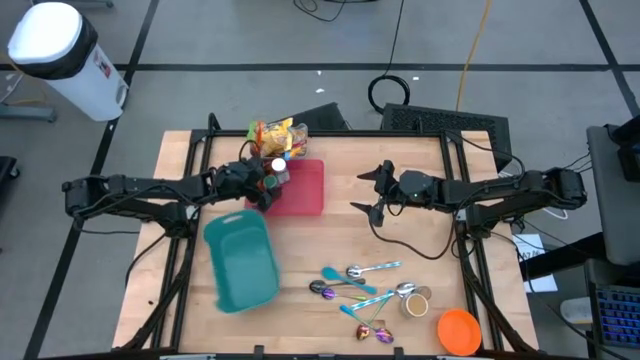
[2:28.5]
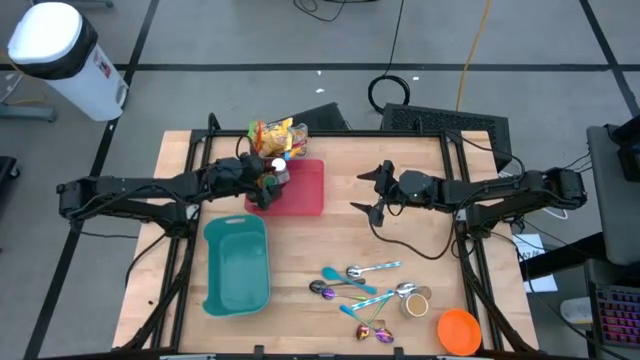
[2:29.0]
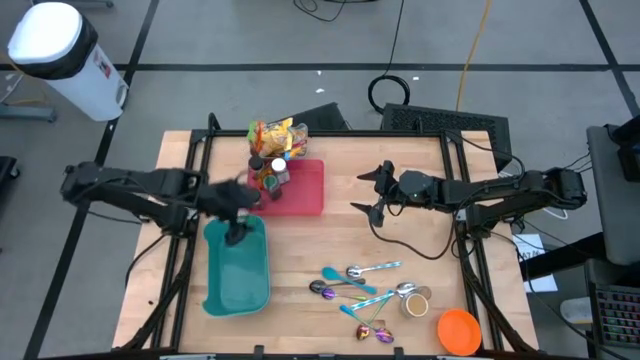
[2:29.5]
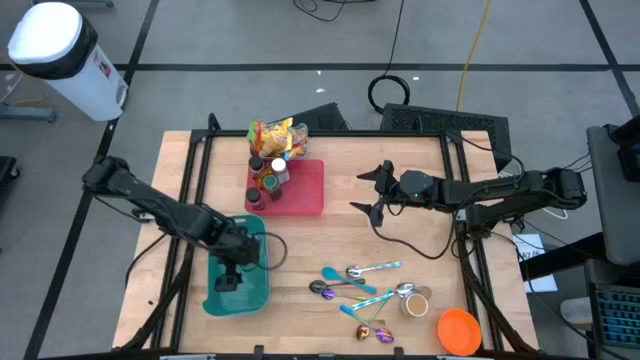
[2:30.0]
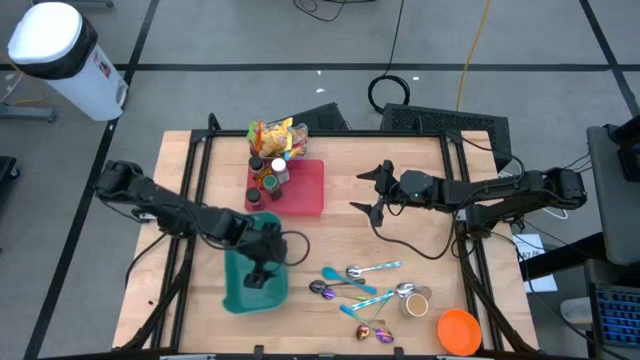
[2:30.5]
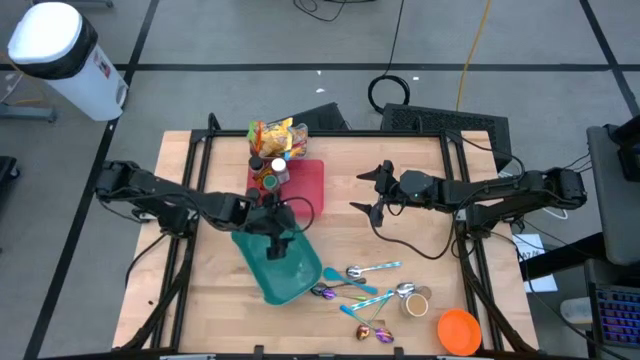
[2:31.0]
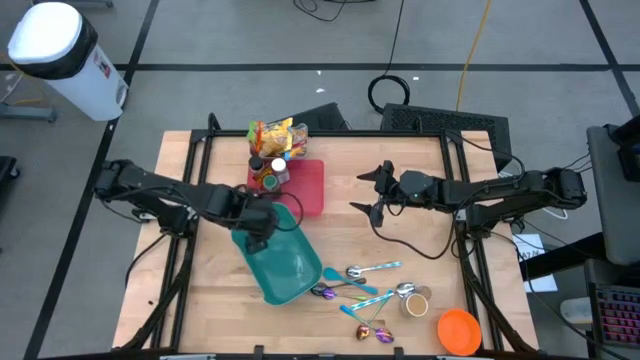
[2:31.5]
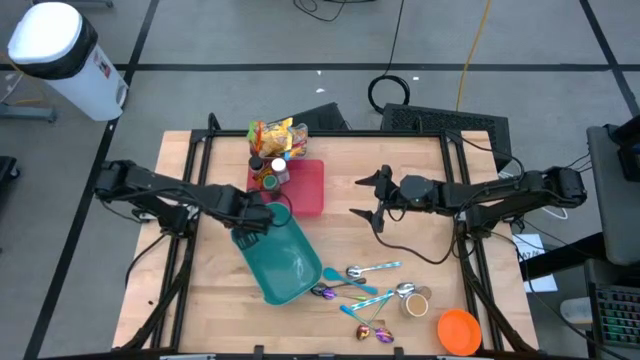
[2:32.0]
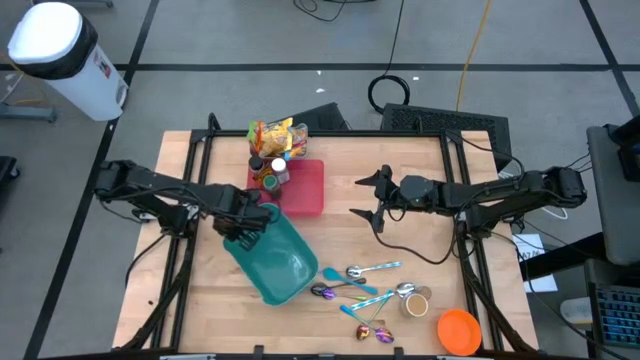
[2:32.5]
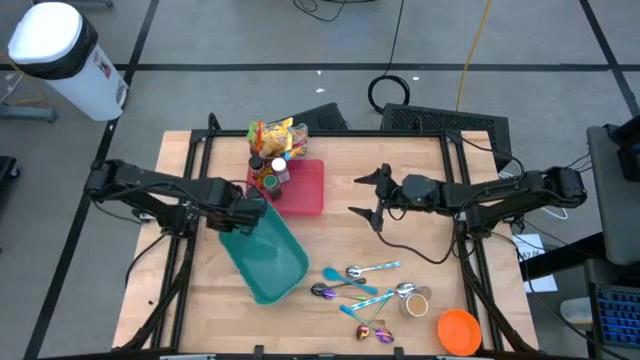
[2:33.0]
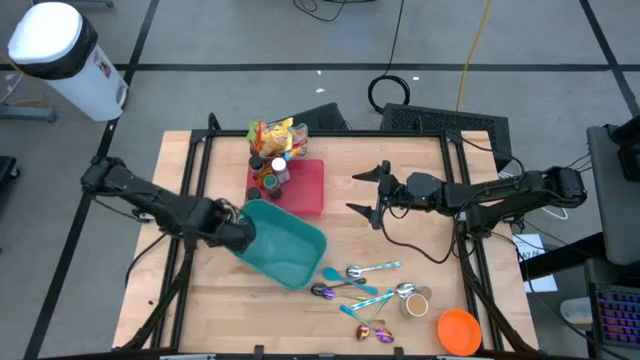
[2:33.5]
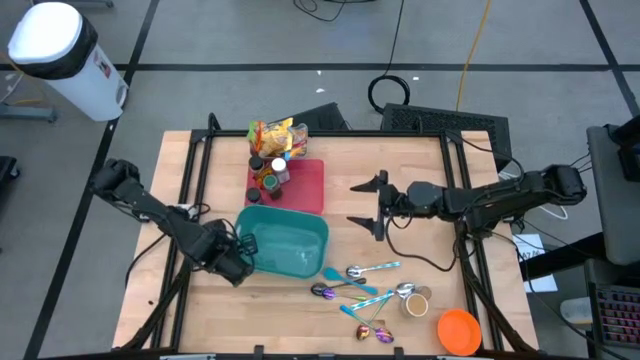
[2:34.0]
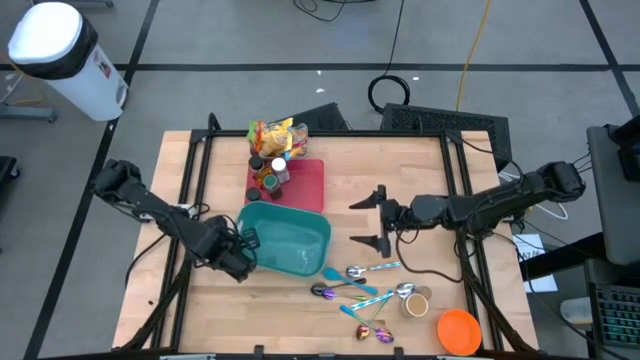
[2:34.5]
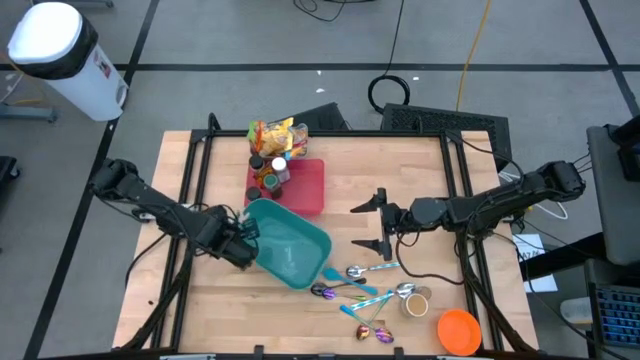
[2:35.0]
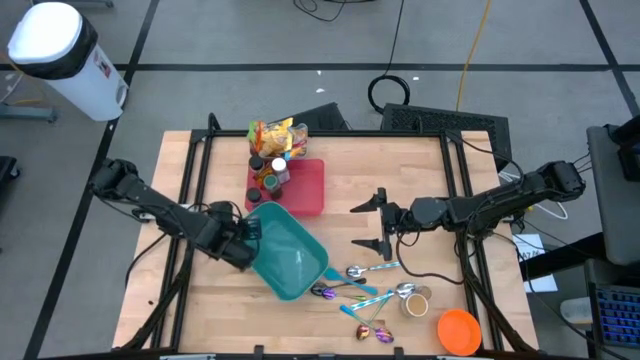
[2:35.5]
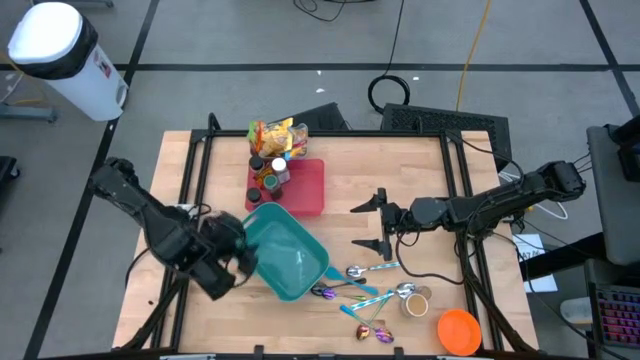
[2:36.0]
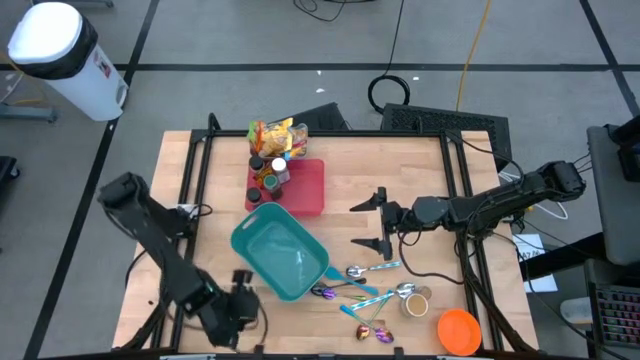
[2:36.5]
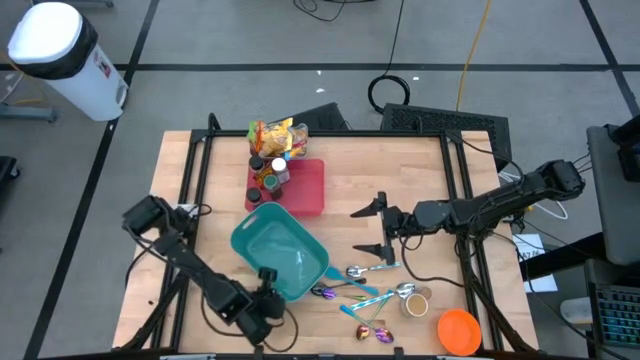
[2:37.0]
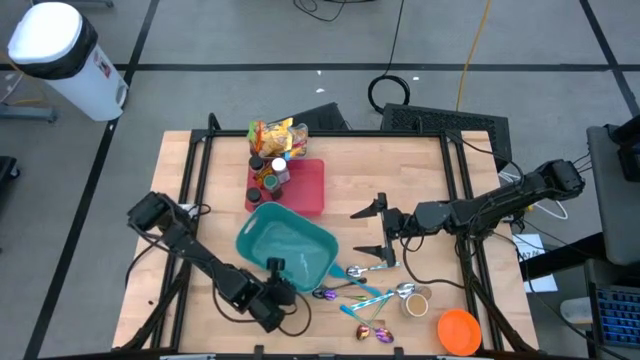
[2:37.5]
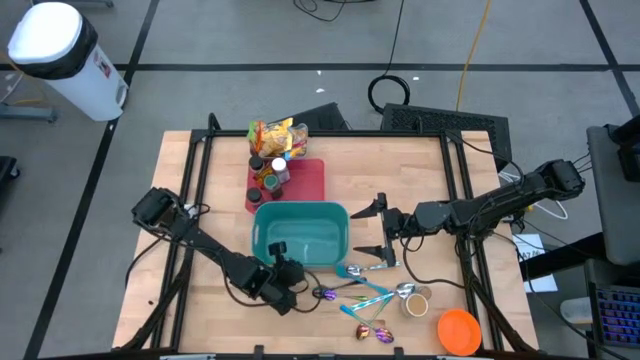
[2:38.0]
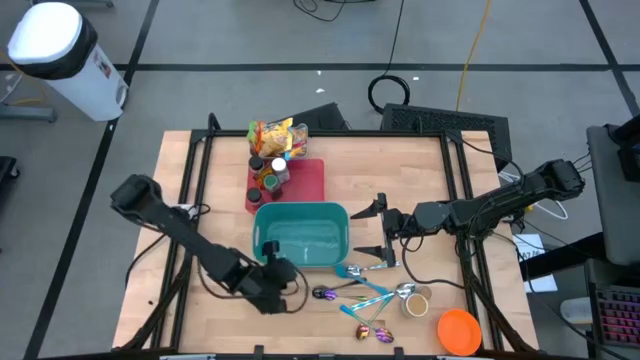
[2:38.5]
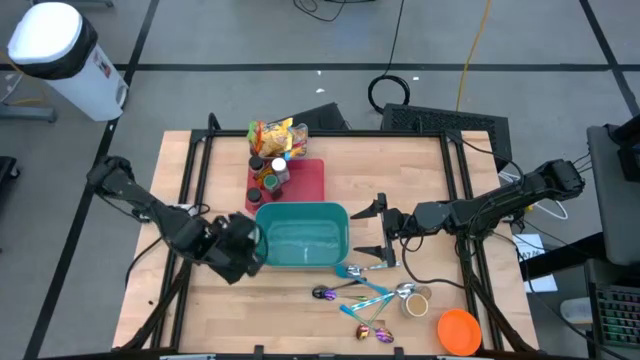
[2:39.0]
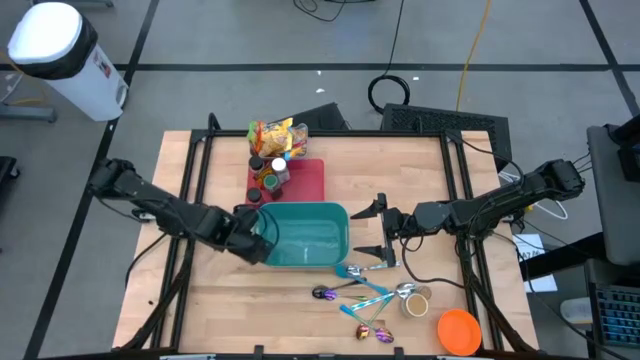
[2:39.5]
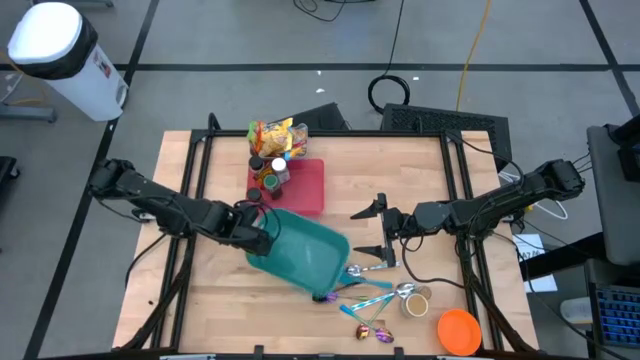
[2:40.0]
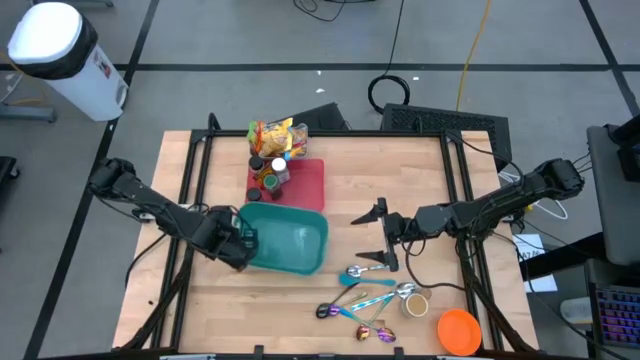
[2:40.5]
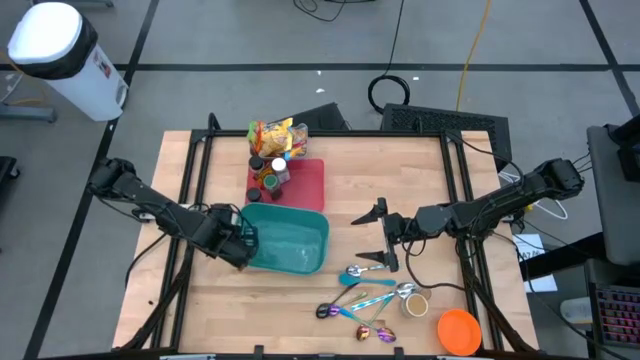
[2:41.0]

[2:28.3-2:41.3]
Task: Pick & Place Food Item
Adjust the blue bin on the table

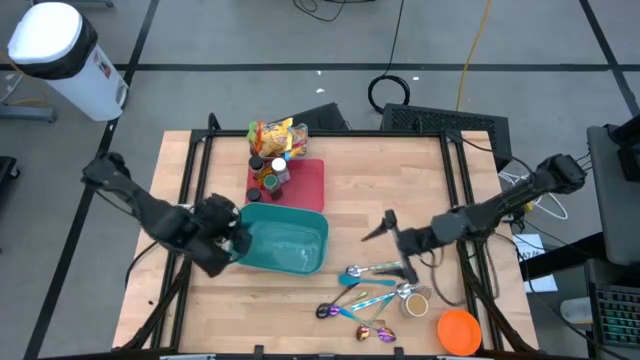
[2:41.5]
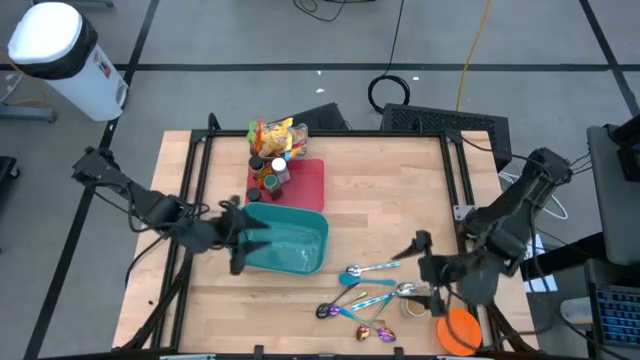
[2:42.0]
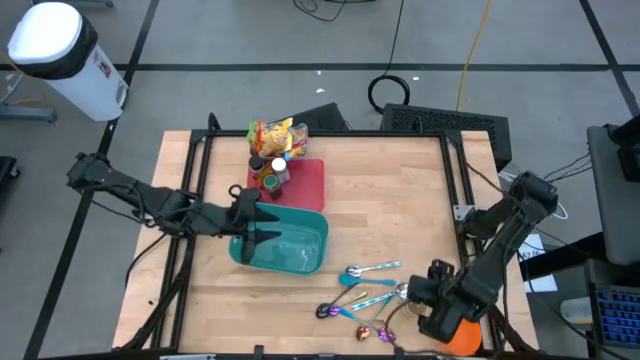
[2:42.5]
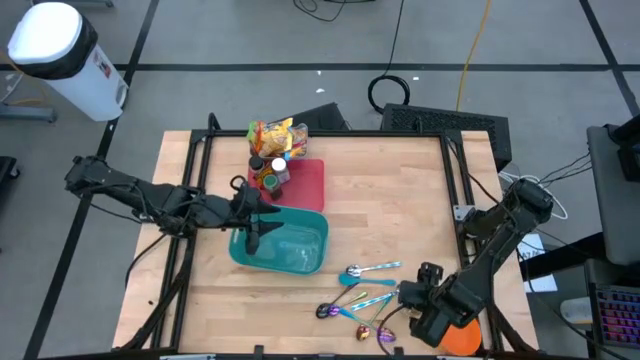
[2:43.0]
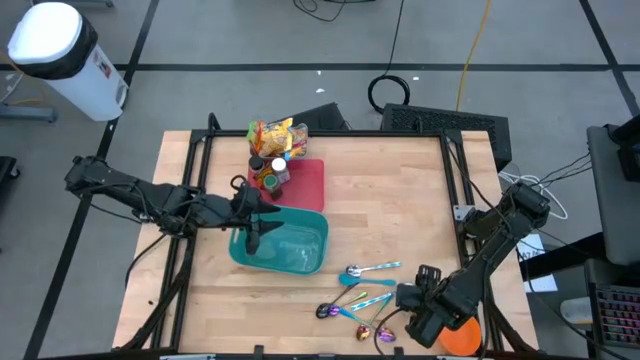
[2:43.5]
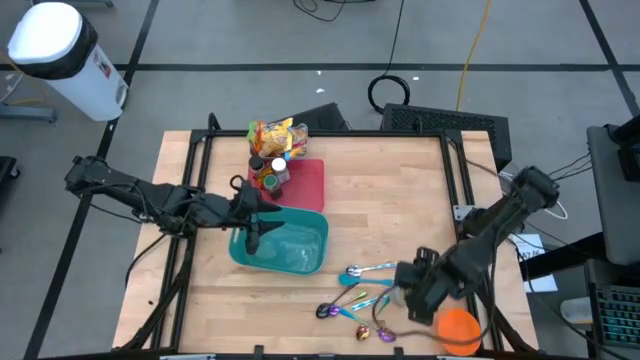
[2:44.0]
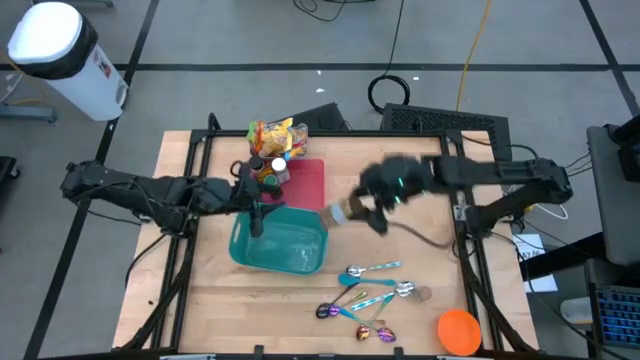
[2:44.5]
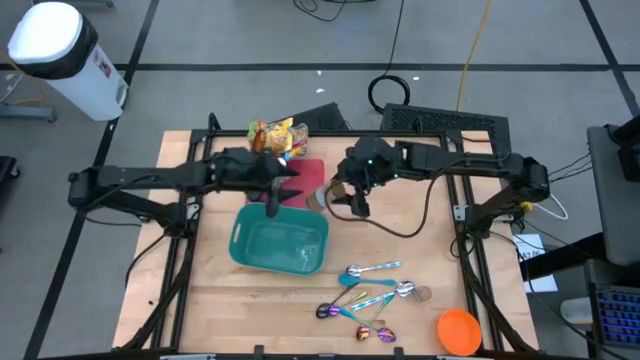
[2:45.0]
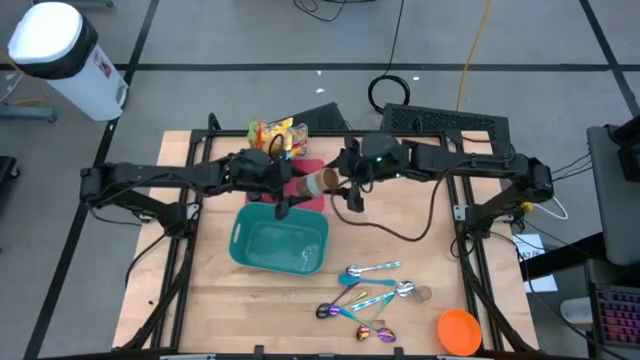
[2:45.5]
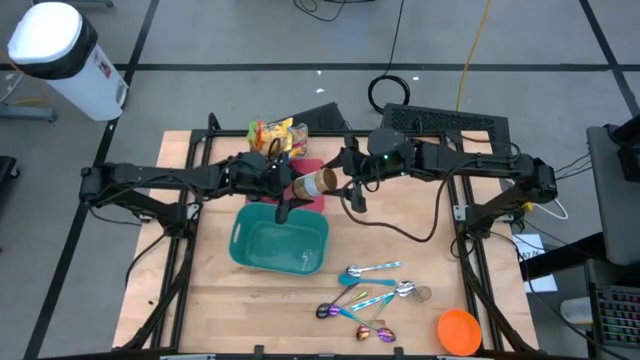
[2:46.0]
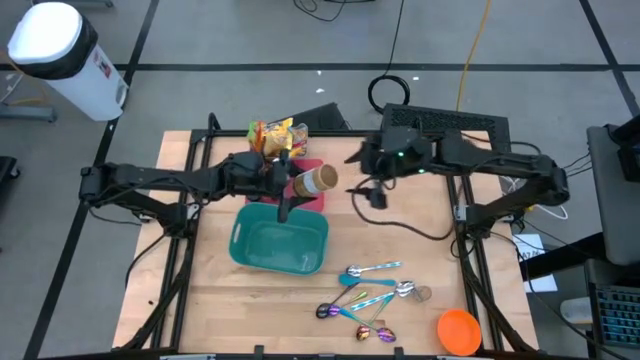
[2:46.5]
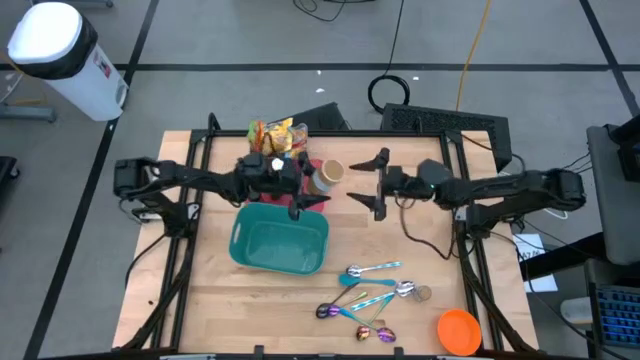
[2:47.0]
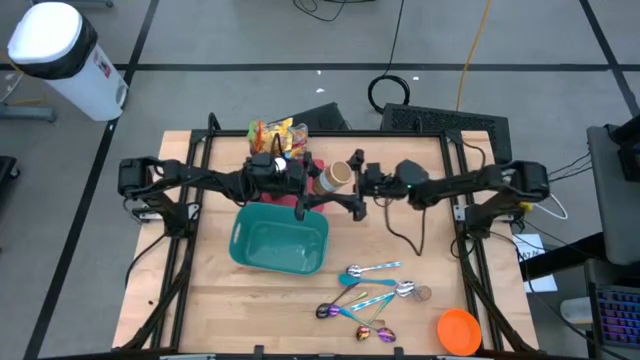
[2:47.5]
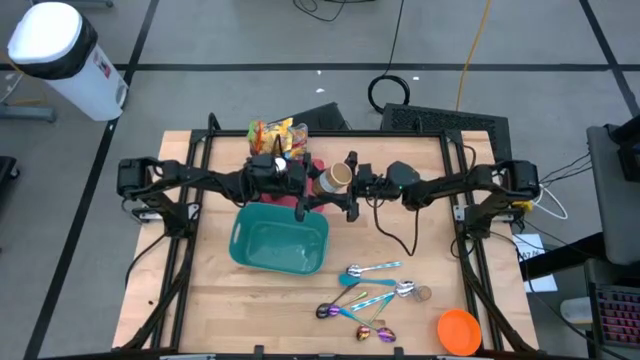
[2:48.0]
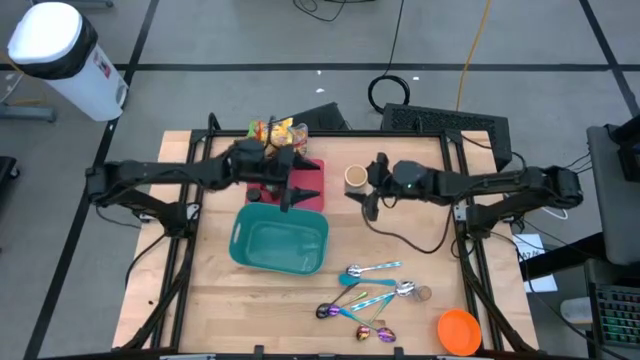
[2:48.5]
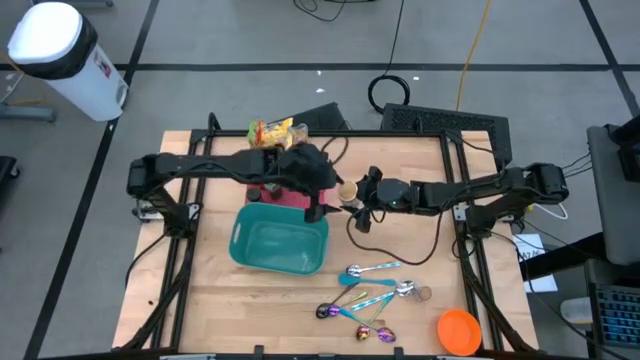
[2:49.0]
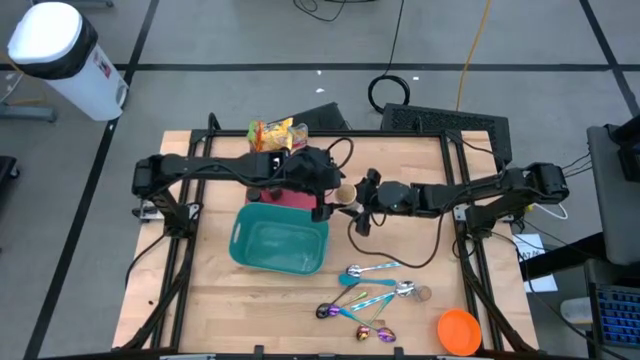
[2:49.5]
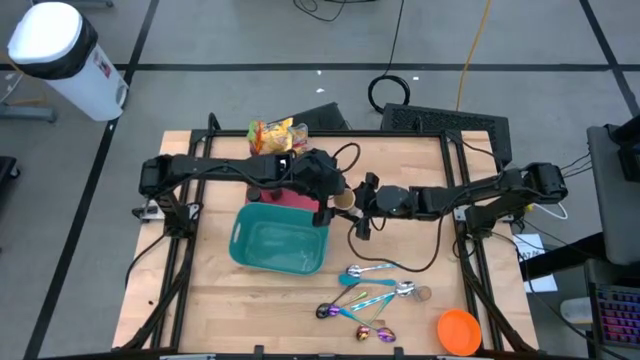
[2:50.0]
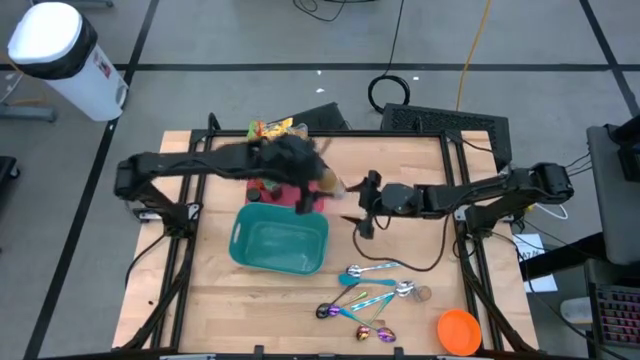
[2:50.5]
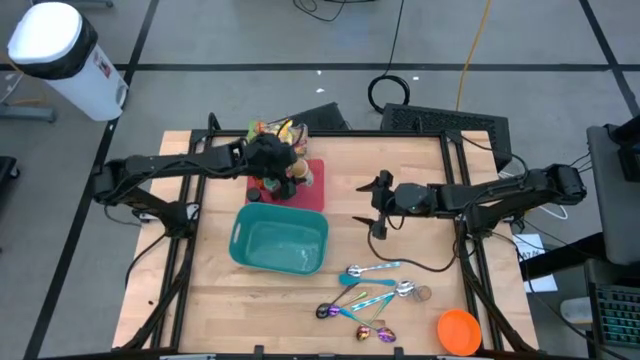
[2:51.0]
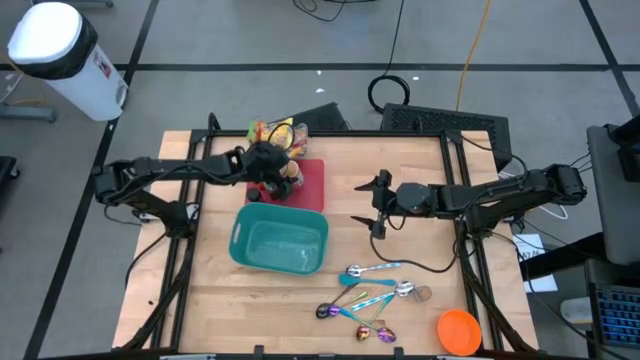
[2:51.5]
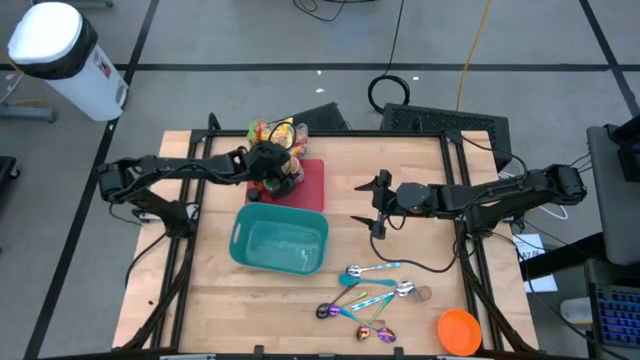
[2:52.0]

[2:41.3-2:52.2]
Put the gold seasoning bottle into the red bin
